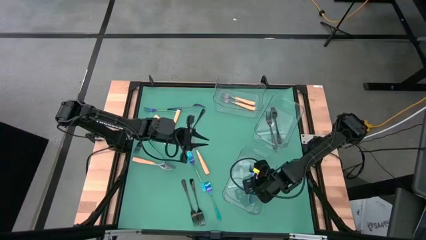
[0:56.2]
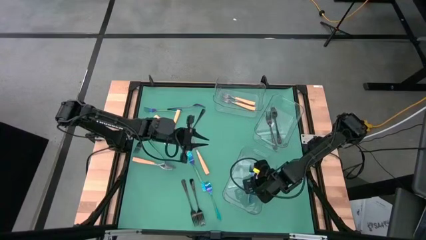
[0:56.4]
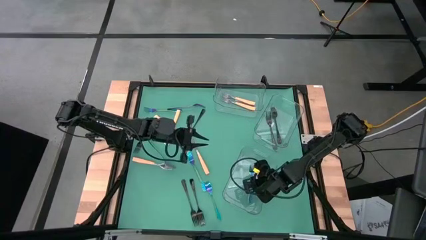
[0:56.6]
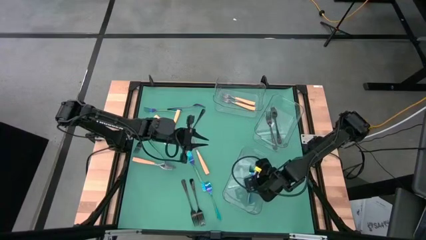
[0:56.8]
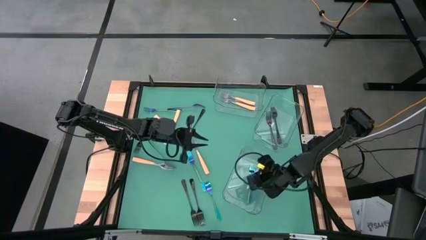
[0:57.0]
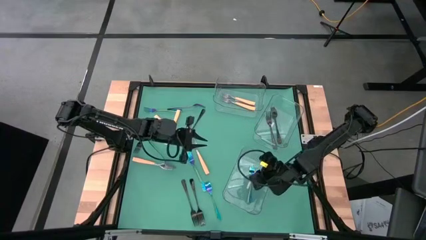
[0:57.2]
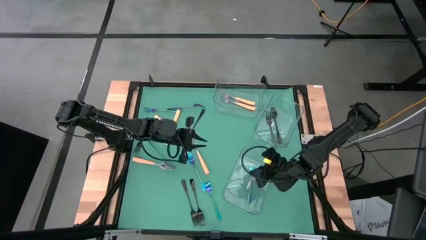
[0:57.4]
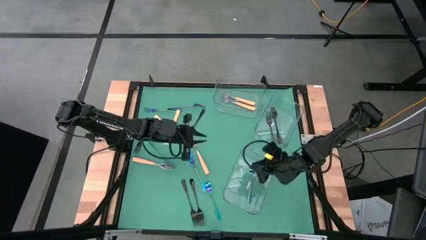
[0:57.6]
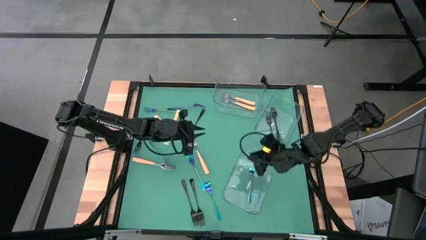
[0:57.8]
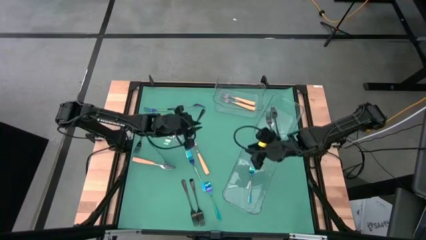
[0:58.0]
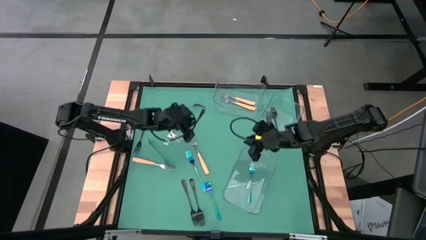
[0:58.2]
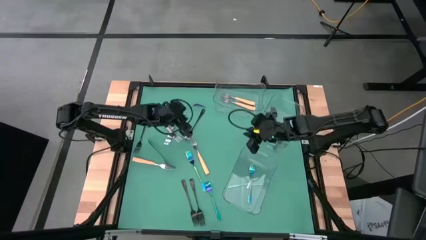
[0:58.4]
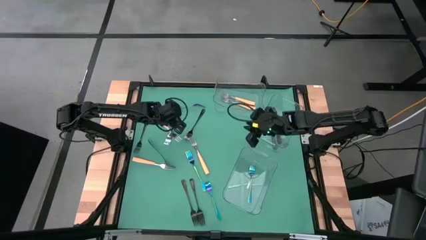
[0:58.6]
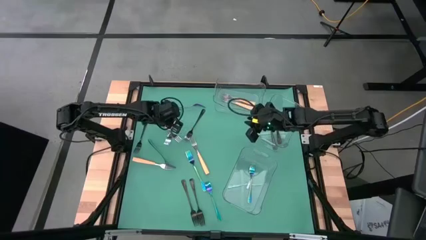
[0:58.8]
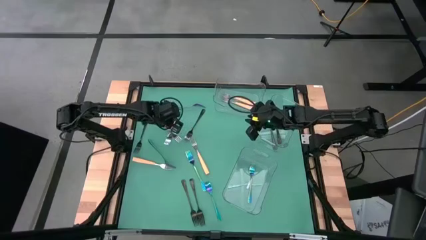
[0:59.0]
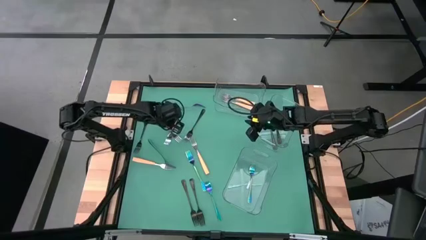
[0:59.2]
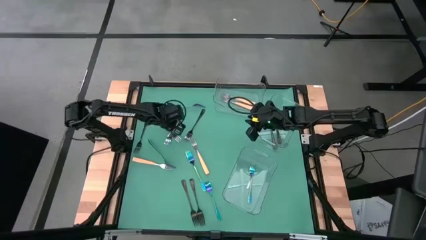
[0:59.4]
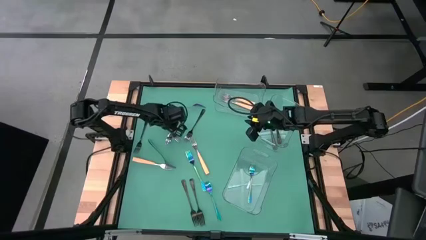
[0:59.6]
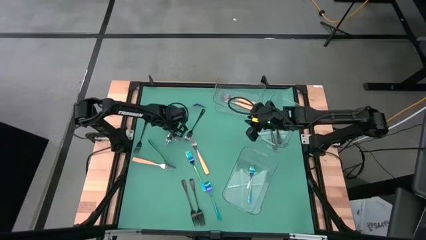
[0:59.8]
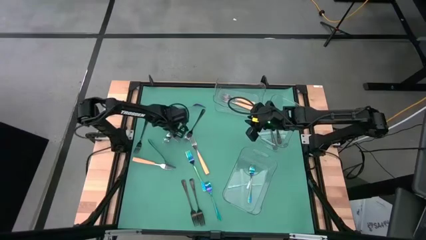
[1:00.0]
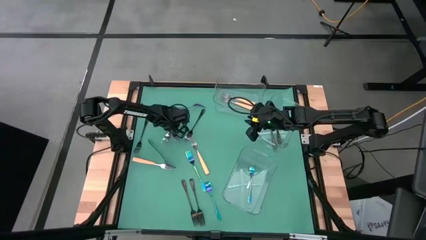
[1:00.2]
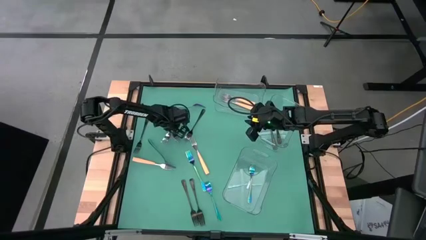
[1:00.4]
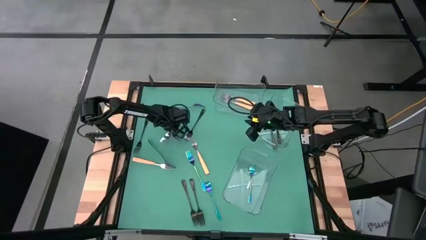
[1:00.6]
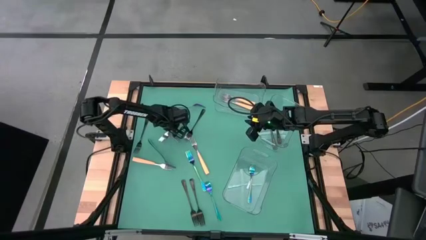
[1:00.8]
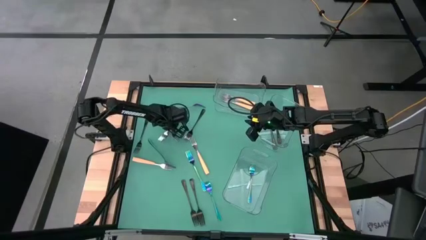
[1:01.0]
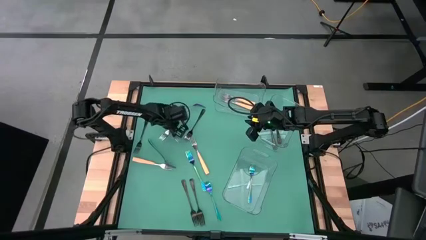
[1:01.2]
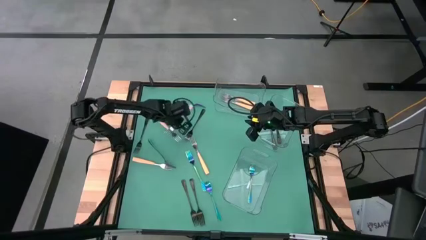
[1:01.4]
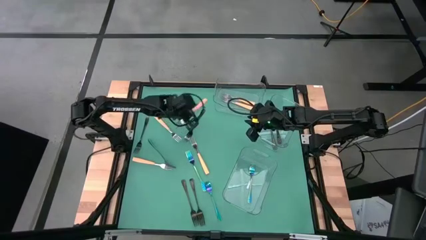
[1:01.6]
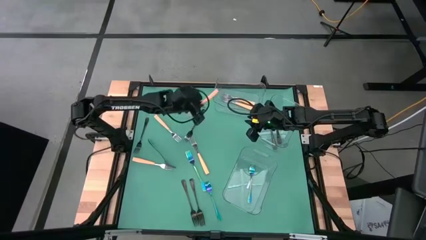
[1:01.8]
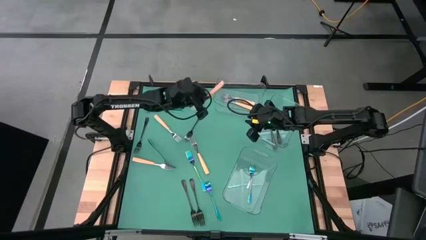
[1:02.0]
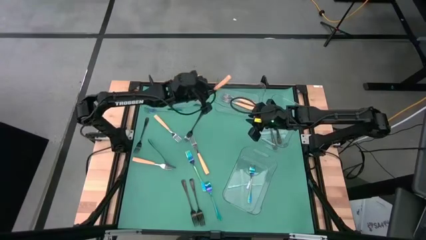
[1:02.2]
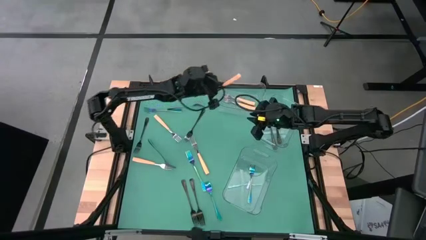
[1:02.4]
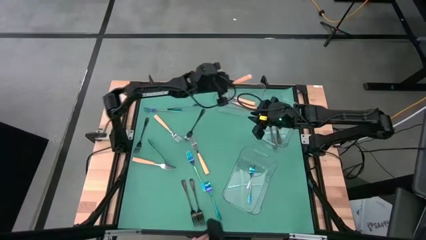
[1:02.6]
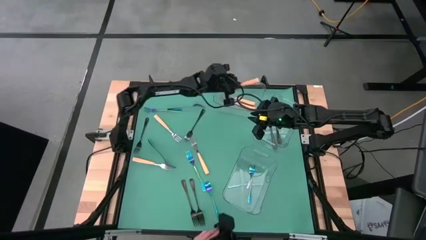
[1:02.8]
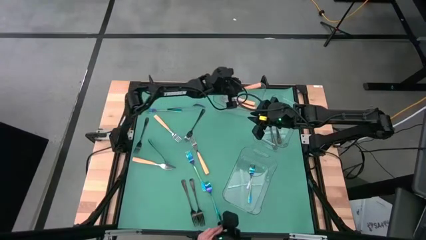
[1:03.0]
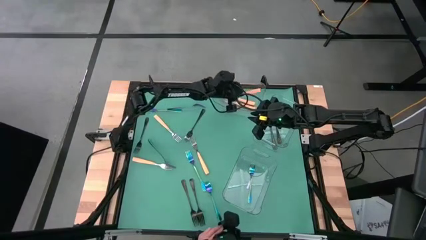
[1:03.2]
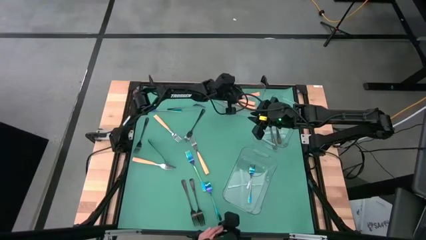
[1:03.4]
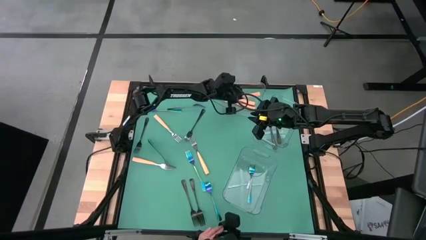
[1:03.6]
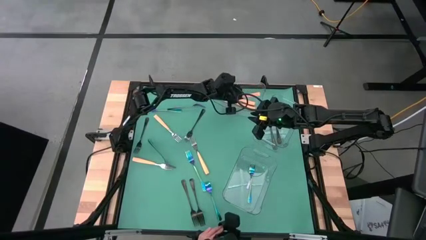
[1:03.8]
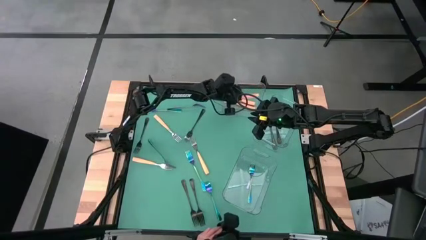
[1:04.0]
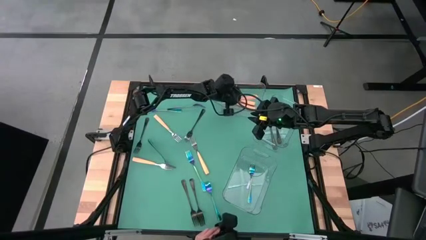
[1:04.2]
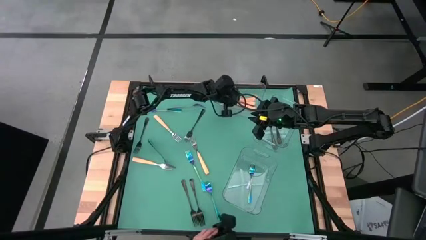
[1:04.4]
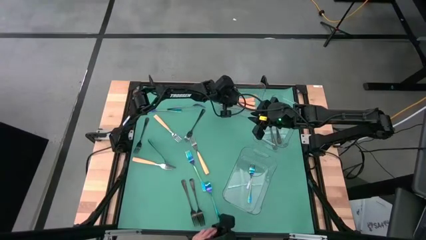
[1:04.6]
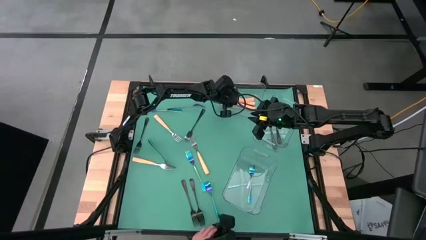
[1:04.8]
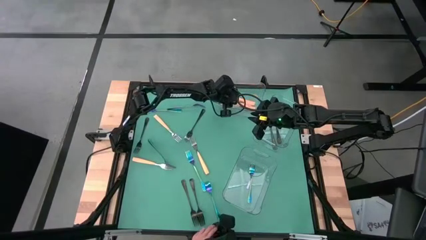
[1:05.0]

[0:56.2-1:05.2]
Task: Sort silverware by color (type)
Put the orange fork into the top transparent bin

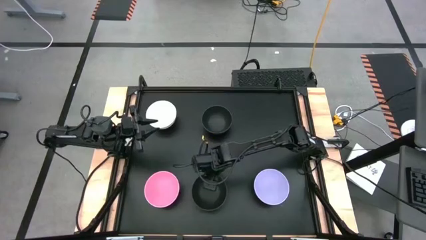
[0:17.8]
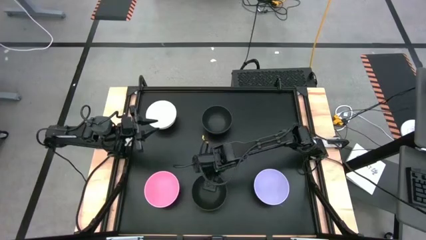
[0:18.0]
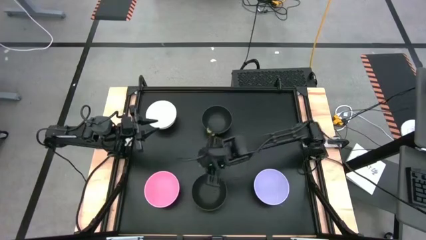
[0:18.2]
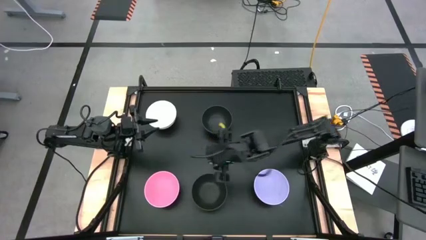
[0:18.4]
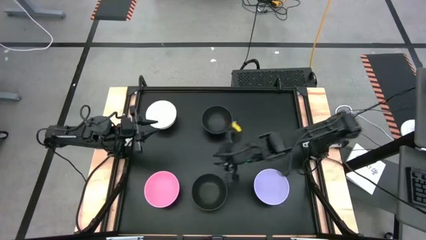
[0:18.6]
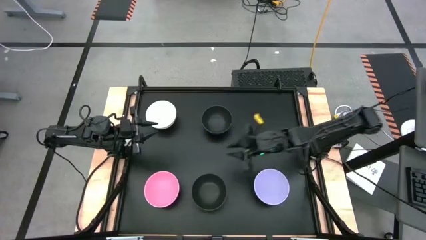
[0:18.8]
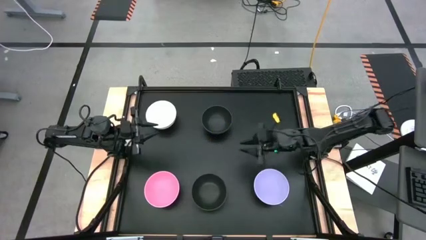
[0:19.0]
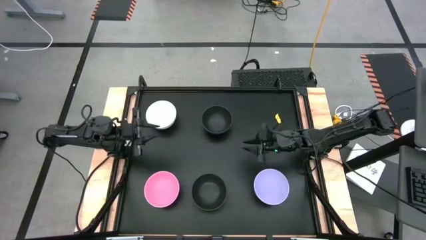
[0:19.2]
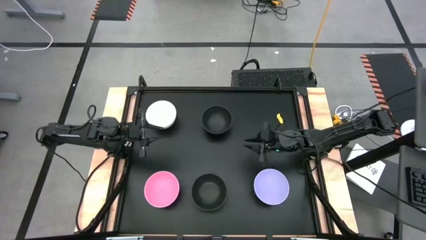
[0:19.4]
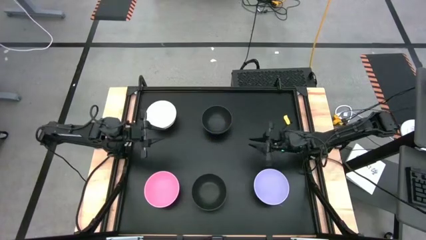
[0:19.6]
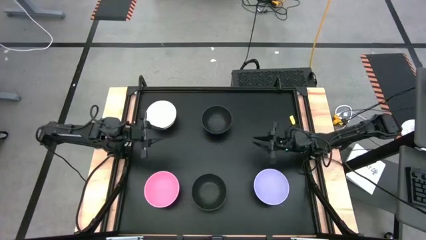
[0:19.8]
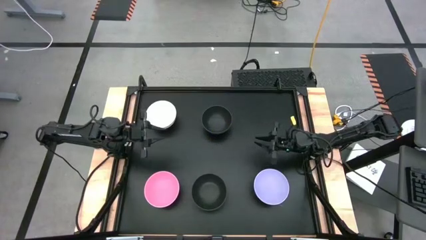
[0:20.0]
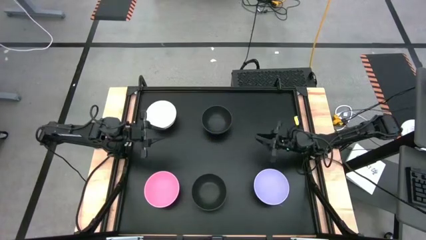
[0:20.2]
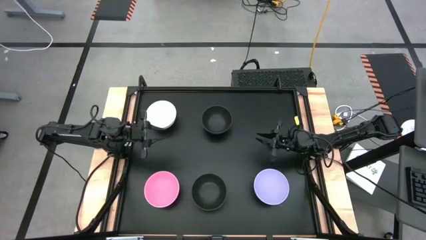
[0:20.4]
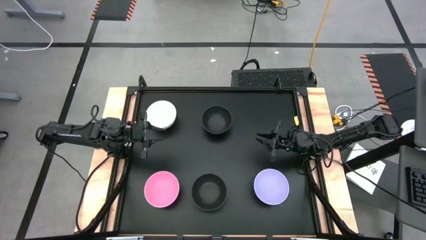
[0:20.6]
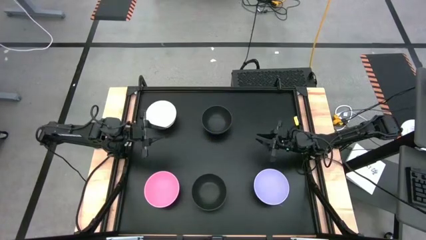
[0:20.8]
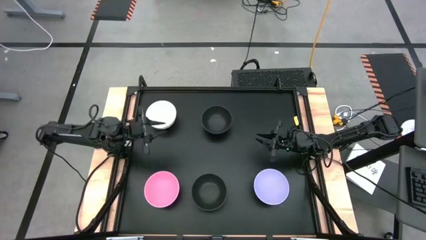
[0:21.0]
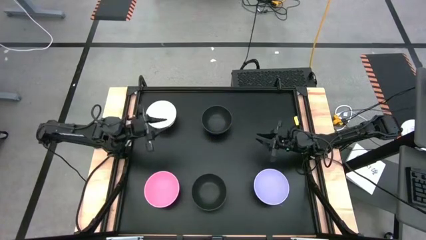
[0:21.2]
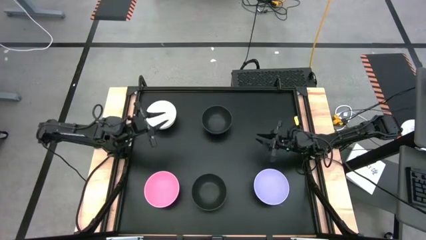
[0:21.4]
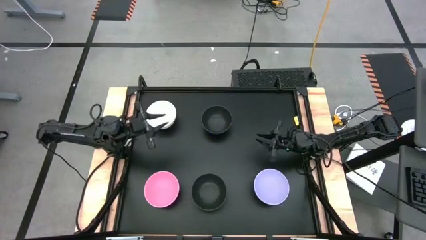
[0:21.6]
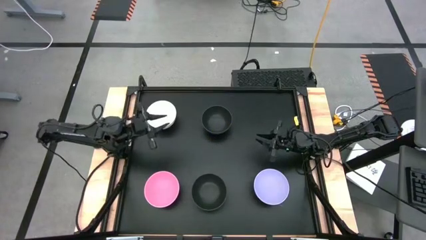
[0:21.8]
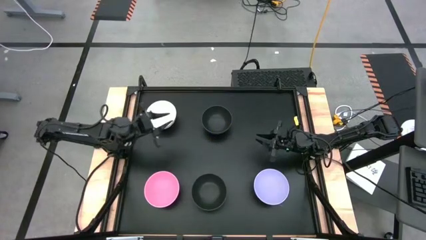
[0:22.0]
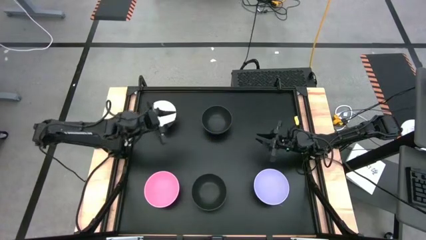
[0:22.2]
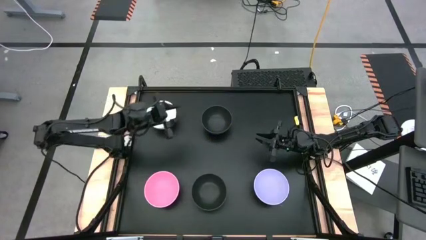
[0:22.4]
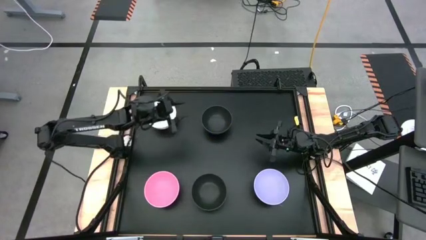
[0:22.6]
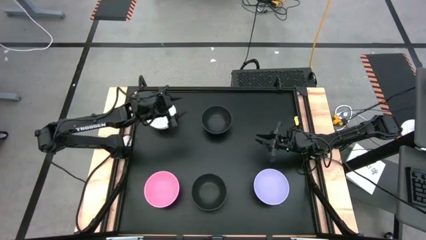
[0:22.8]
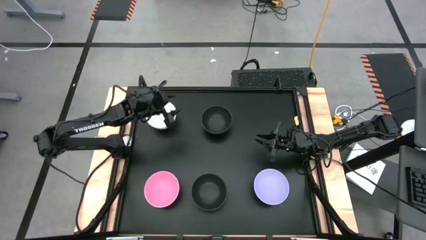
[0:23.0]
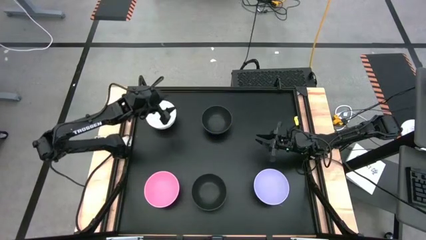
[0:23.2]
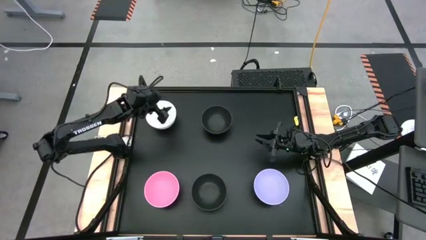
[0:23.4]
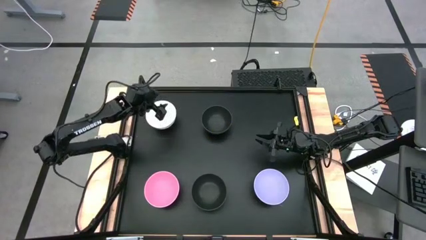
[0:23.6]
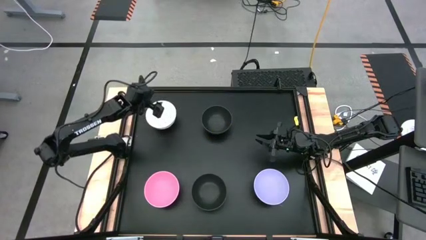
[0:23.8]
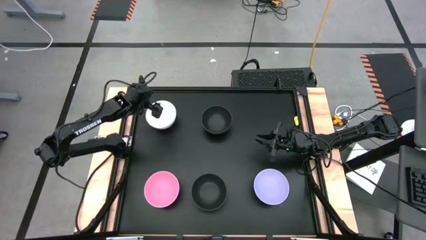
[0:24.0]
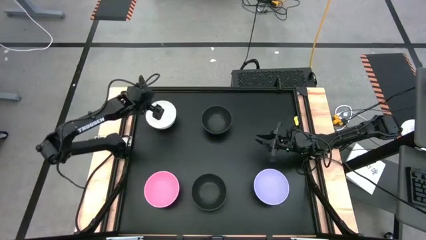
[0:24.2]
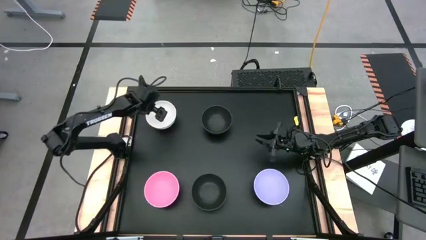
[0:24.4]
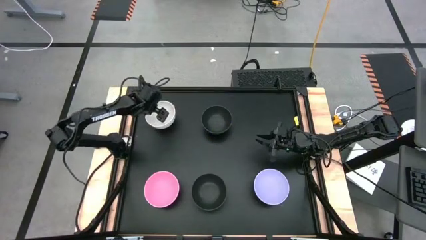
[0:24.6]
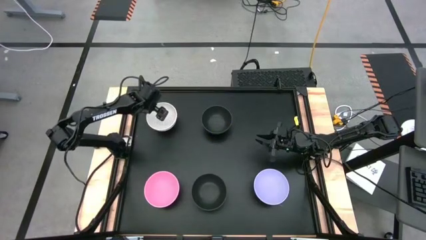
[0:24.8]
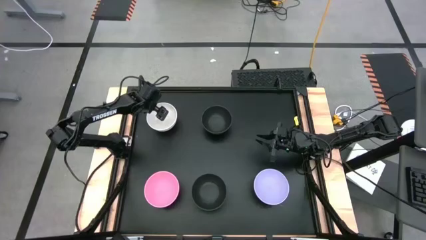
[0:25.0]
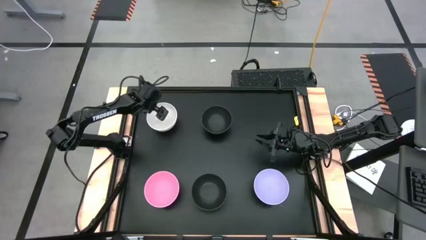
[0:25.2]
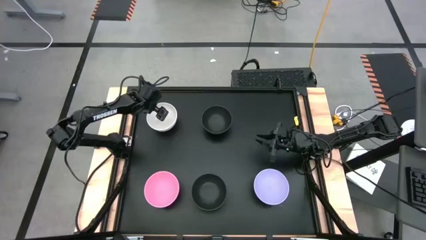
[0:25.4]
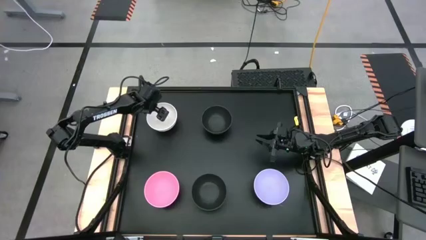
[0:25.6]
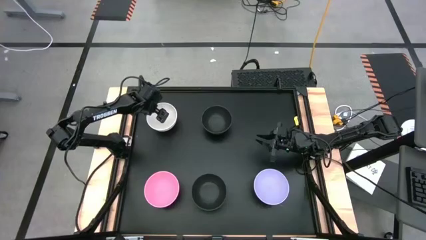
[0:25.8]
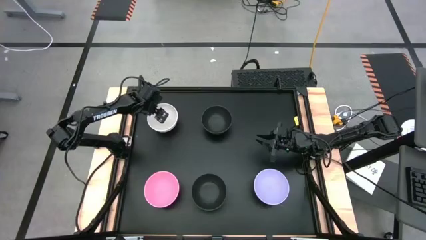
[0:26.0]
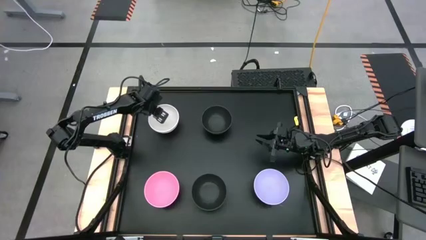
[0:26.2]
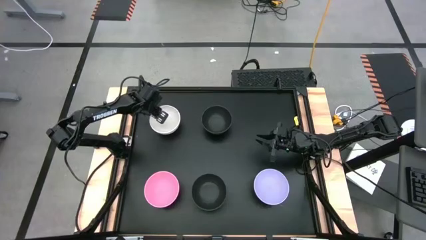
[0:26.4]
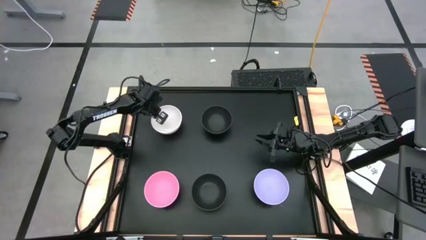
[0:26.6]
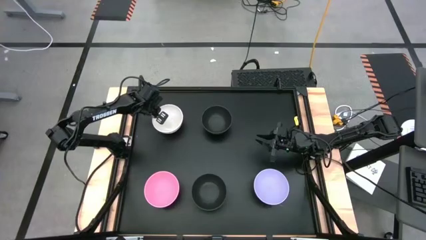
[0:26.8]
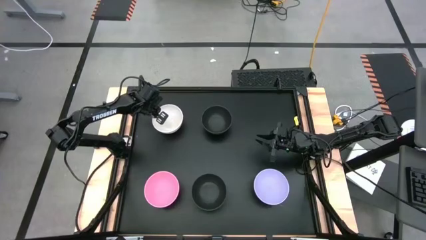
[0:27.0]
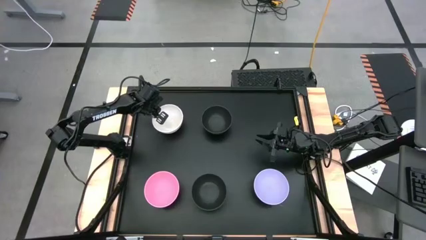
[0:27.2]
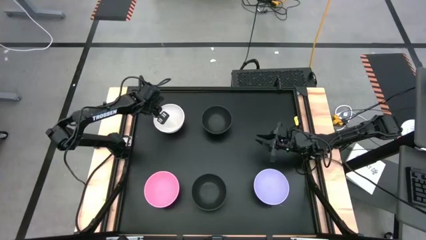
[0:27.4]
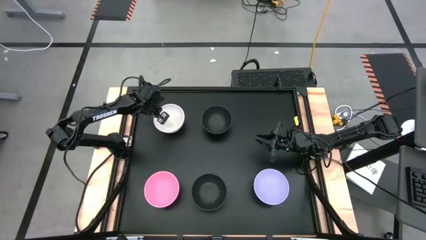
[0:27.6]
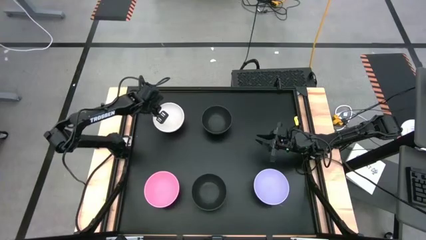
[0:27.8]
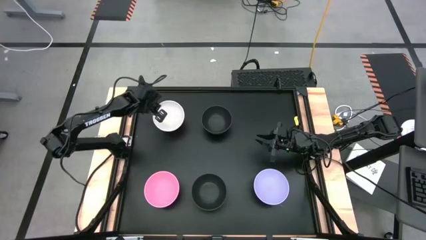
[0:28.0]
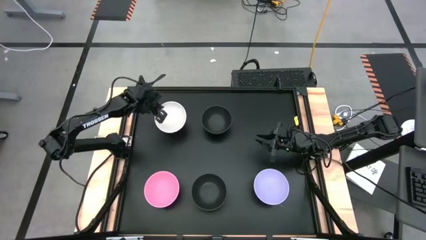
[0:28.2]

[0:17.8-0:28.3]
Task: Nest bowls inside each other
Stack the white bowl on top of the stacked black bowl
